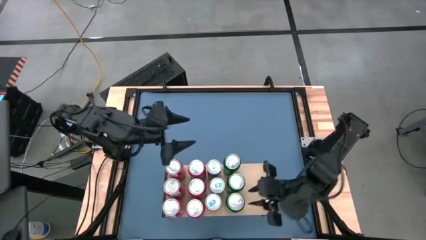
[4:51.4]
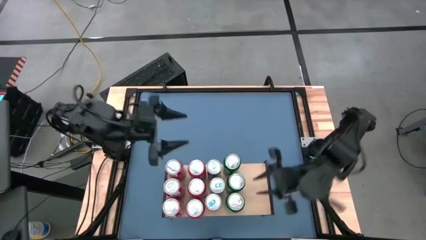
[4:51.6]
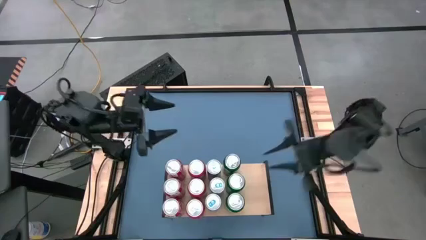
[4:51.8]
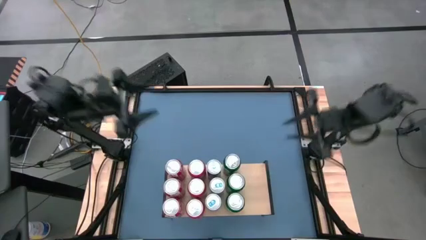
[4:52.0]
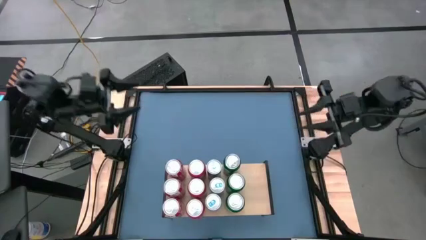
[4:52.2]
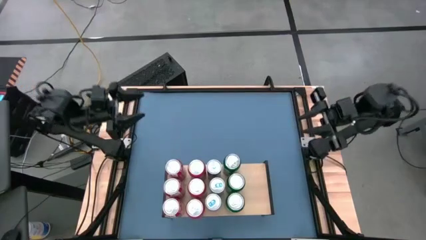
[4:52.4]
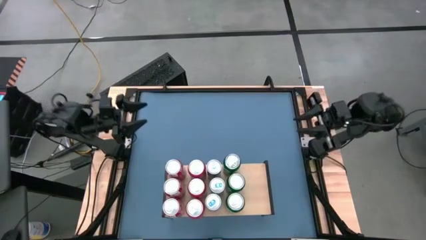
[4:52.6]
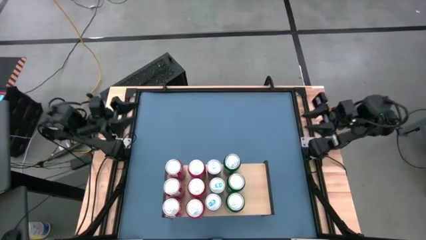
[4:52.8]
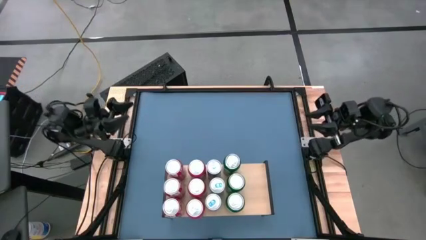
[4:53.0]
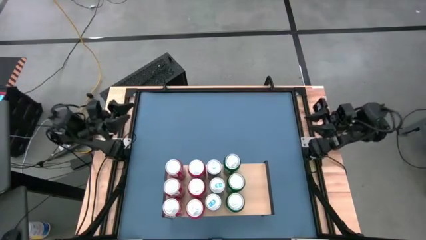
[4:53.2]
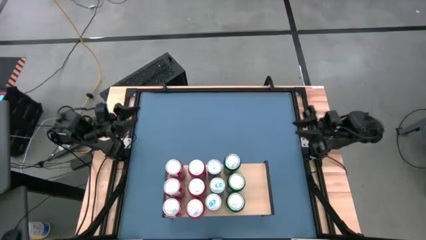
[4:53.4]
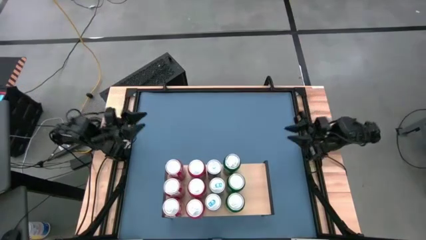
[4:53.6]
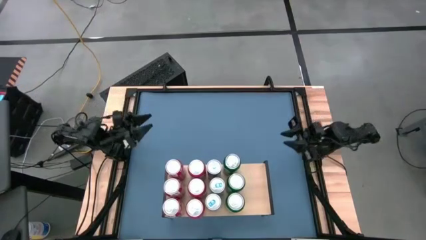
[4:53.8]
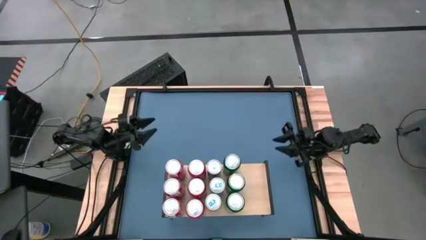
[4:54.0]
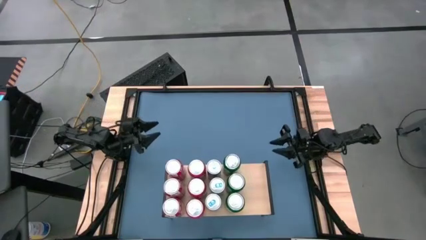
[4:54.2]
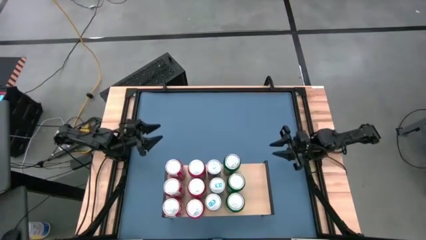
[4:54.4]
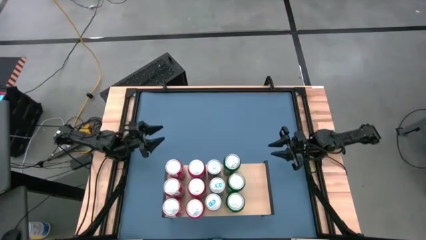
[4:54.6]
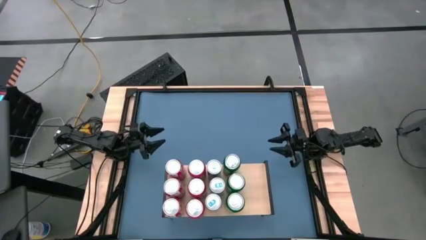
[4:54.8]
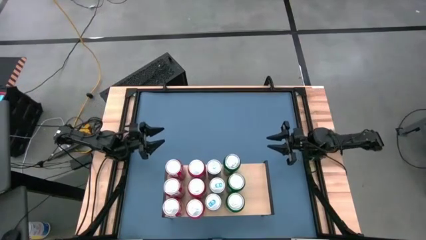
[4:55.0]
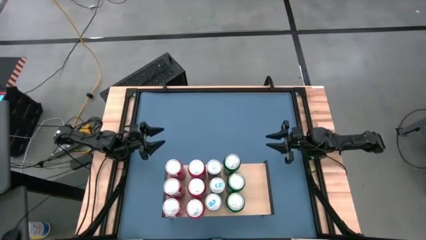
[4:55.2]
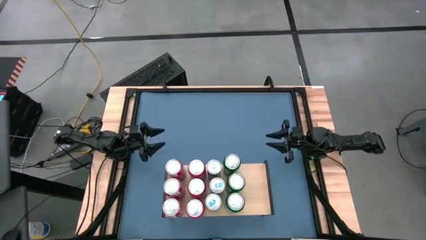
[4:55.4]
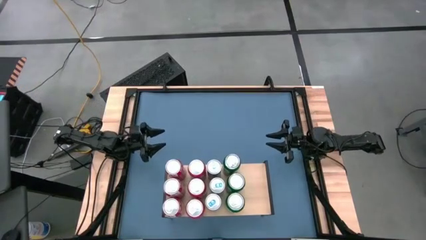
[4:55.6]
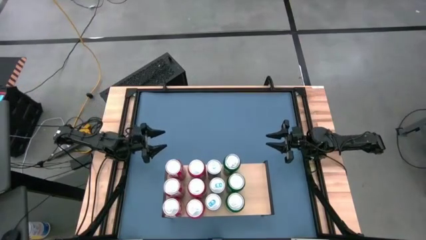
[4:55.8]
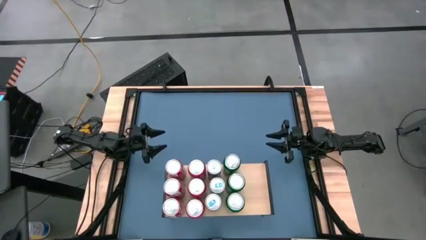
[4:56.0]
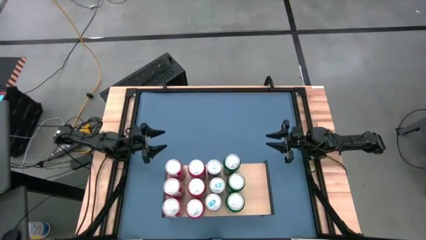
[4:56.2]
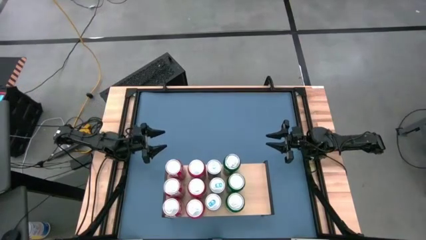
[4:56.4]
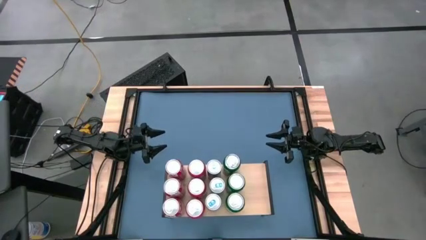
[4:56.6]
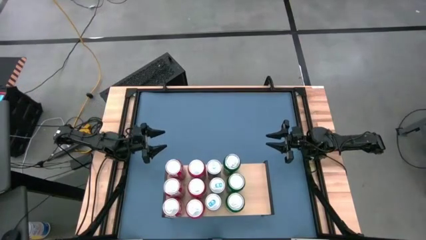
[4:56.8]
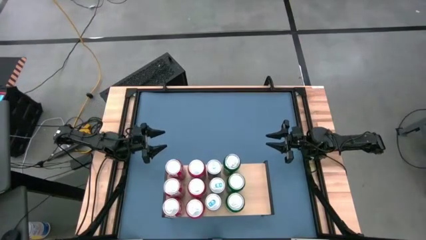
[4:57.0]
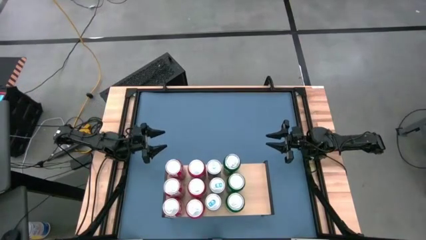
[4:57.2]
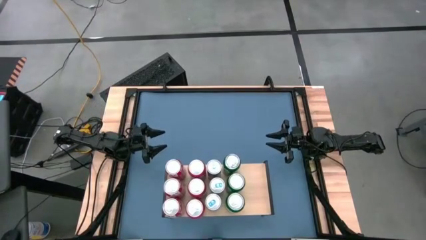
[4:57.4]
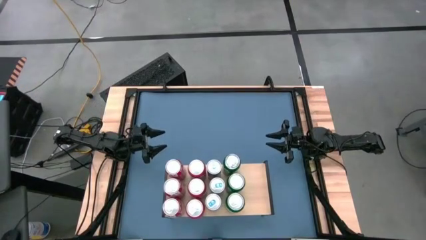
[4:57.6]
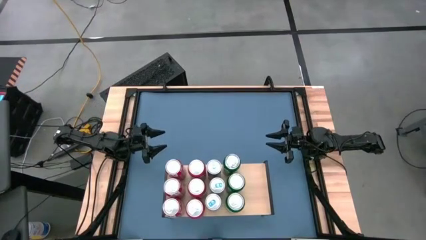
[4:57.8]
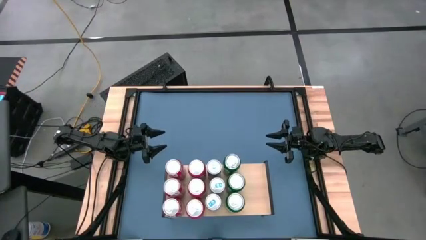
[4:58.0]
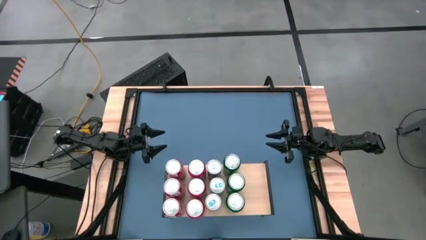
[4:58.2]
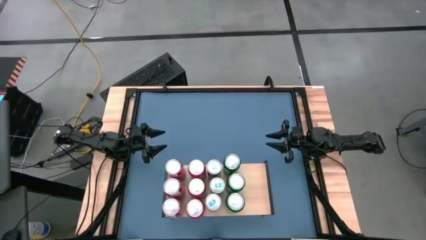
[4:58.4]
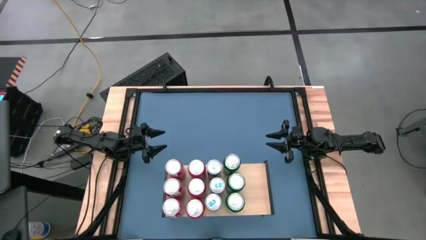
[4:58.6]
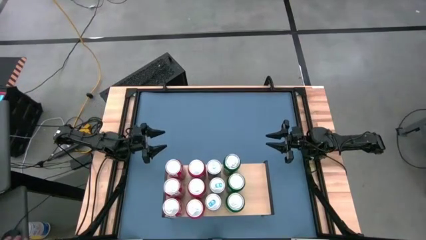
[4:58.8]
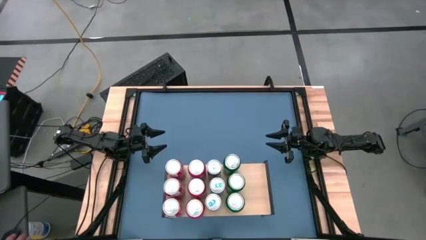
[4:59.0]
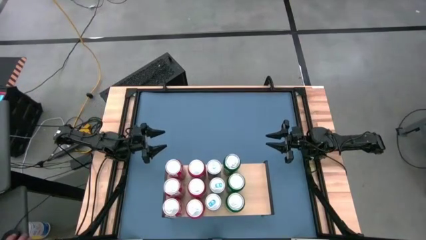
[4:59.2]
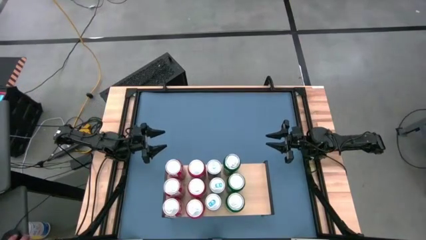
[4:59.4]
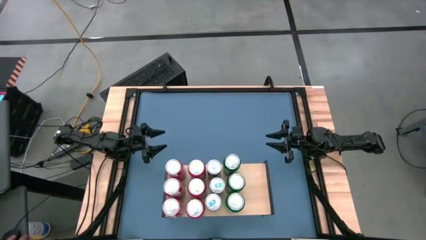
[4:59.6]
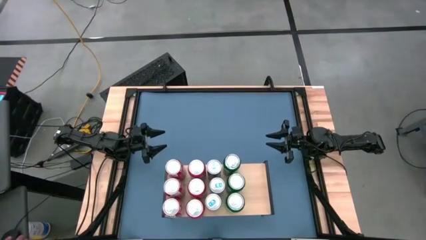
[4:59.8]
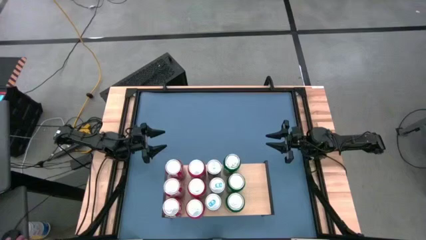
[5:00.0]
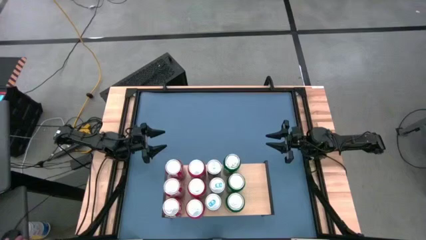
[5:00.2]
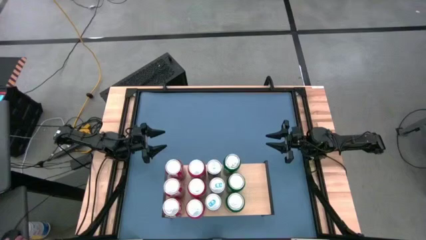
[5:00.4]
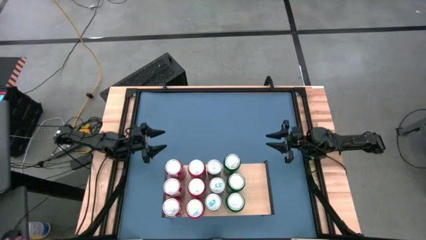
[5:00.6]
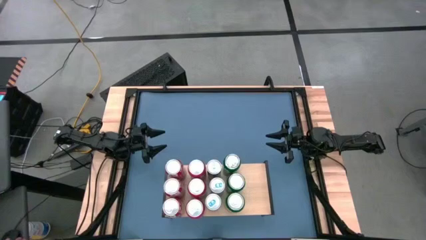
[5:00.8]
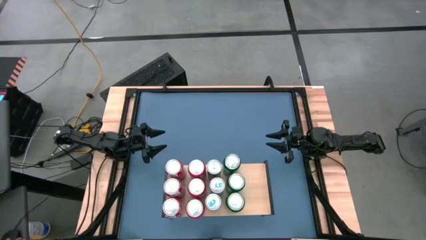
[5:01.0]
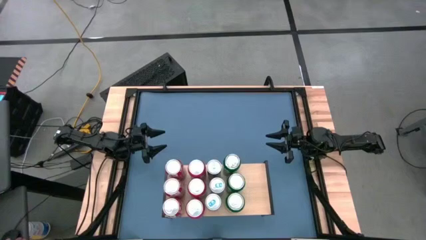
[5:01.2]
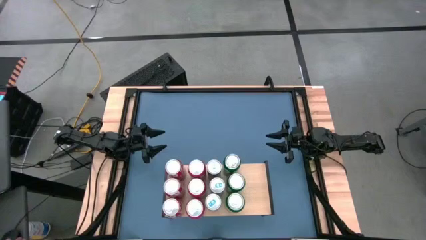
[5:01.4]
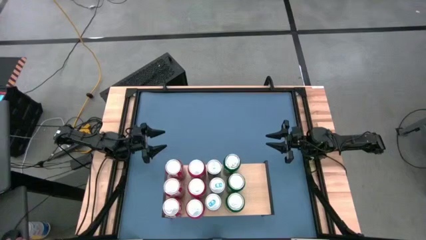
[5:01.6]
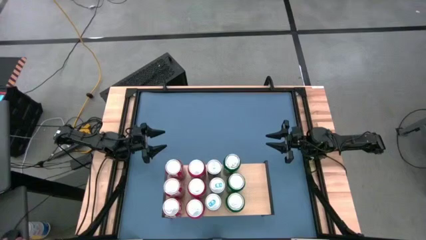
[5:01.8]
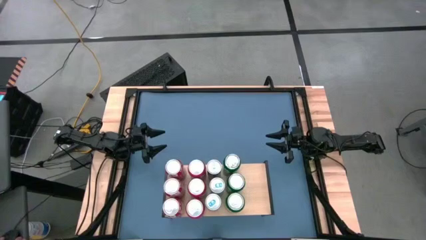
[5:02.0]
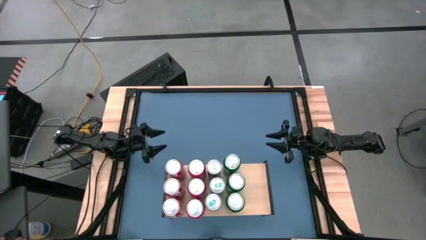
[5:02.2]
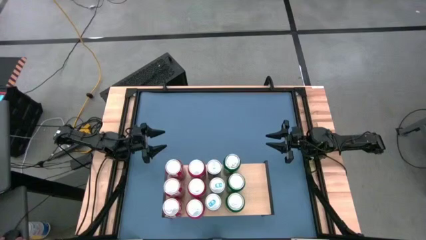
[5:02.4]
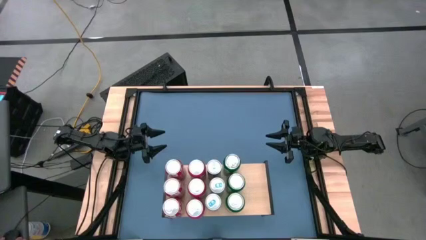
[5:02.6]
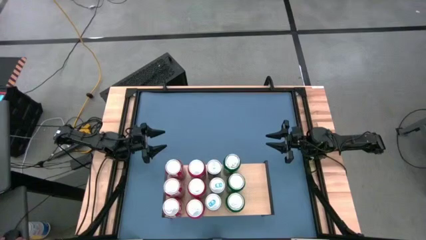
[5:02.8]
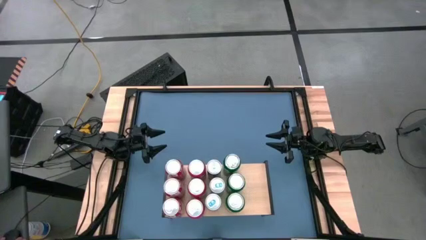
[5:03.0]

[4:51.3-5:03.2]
Task: Place canned beverage on shelf
Return to Home Position
